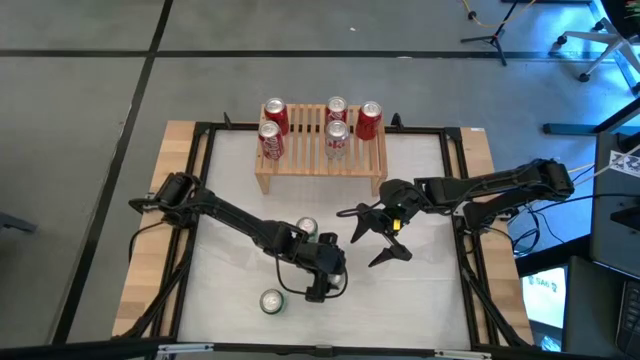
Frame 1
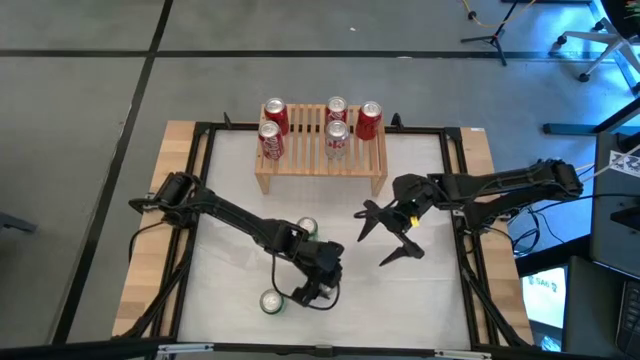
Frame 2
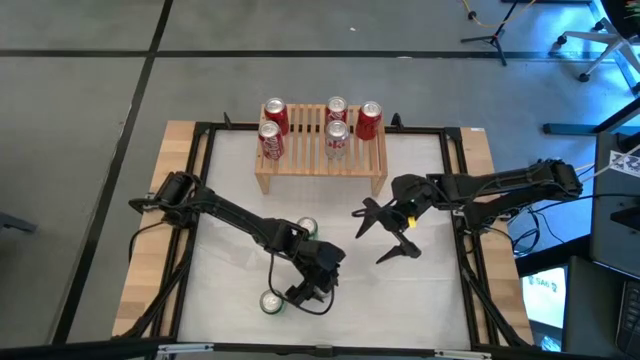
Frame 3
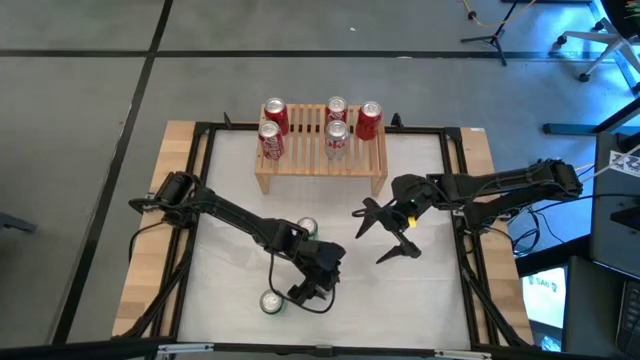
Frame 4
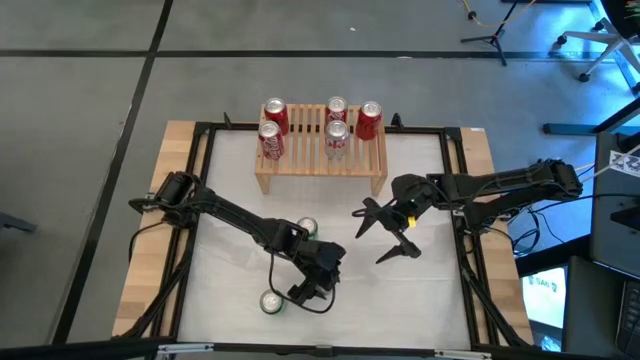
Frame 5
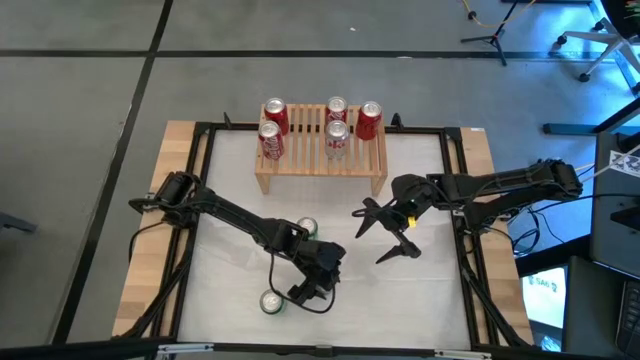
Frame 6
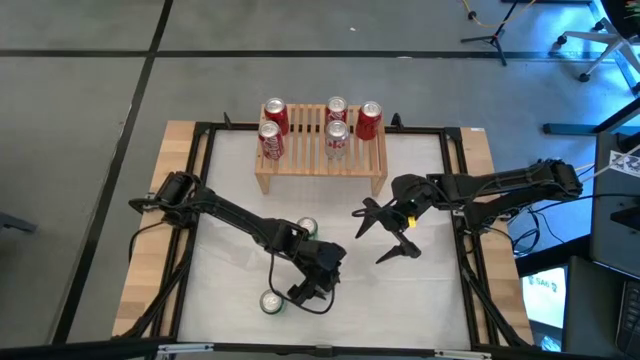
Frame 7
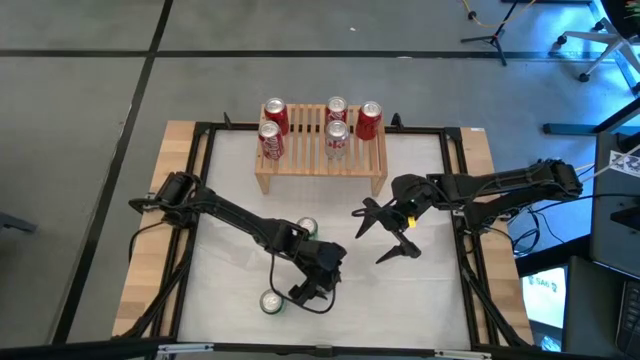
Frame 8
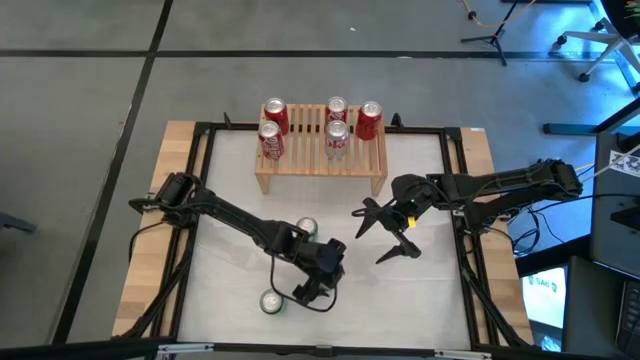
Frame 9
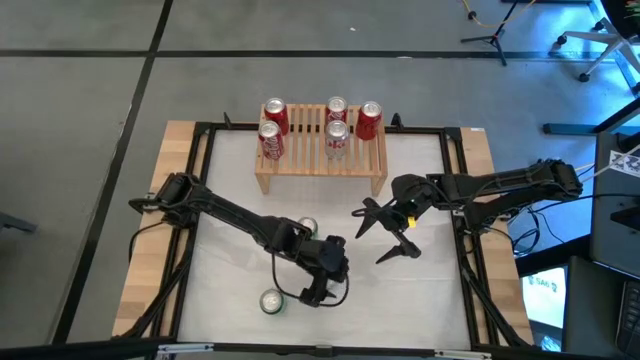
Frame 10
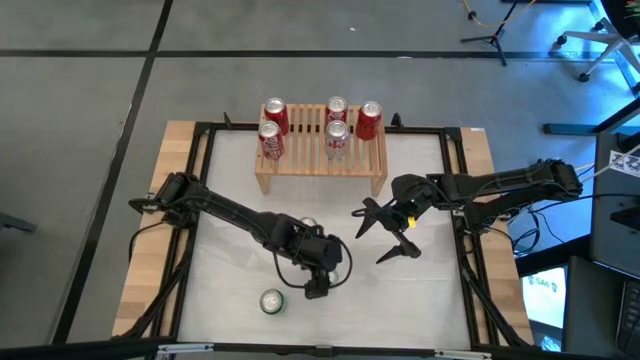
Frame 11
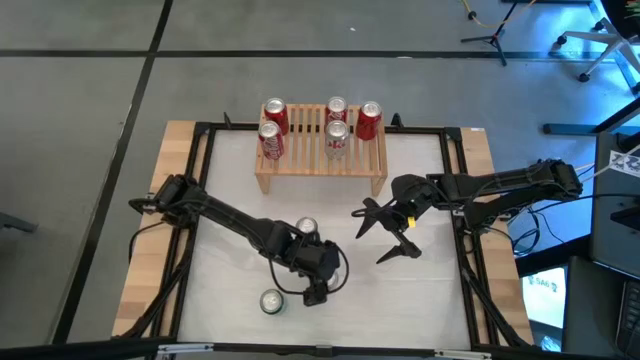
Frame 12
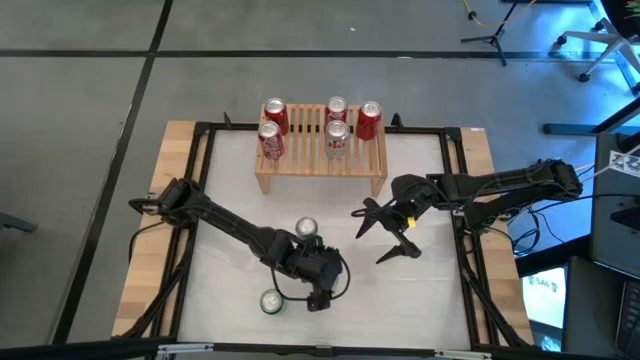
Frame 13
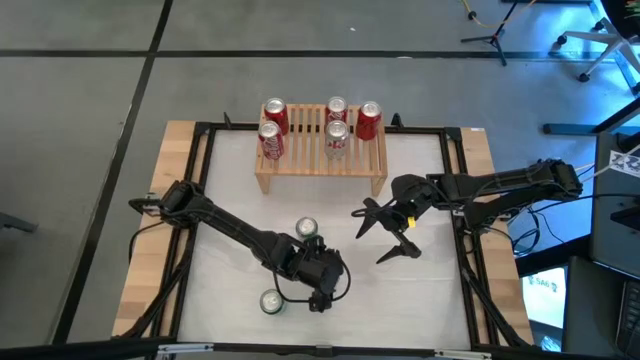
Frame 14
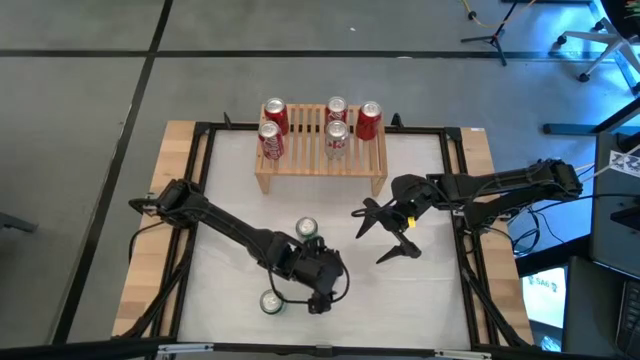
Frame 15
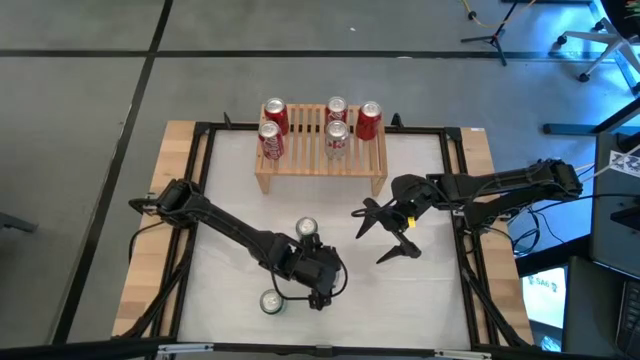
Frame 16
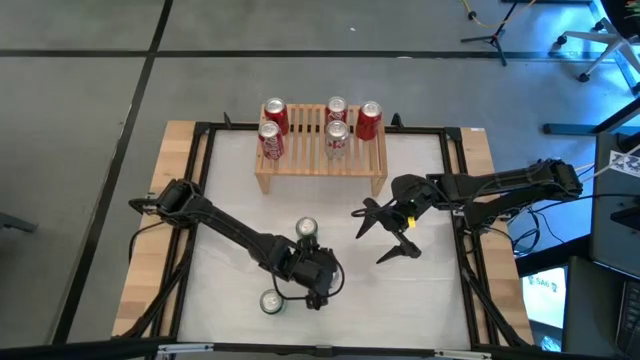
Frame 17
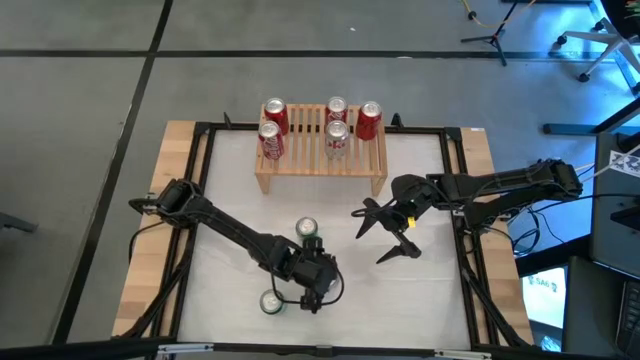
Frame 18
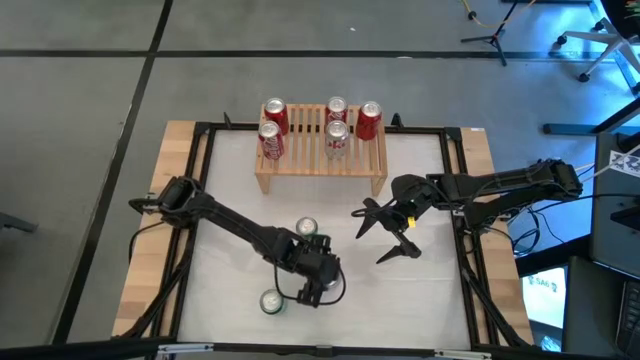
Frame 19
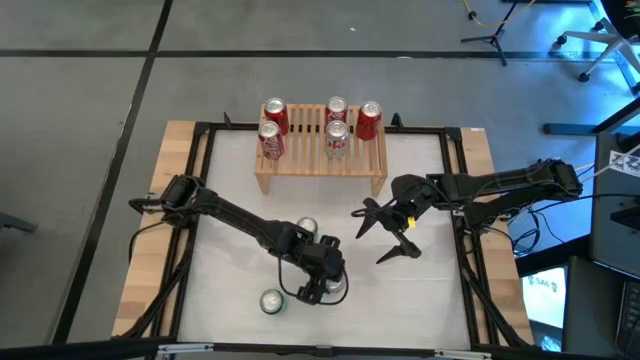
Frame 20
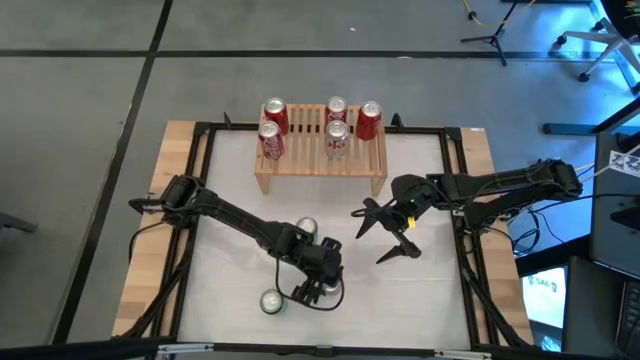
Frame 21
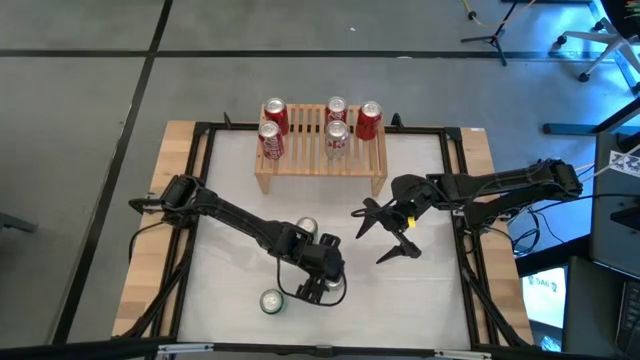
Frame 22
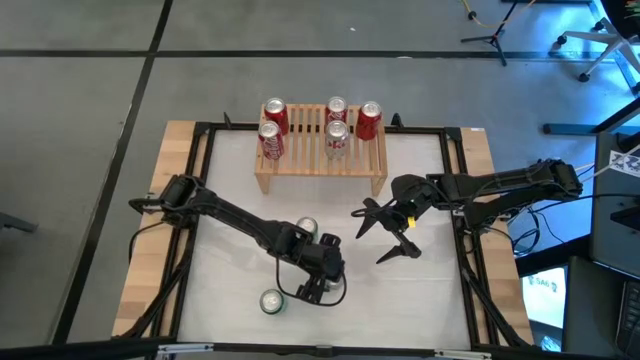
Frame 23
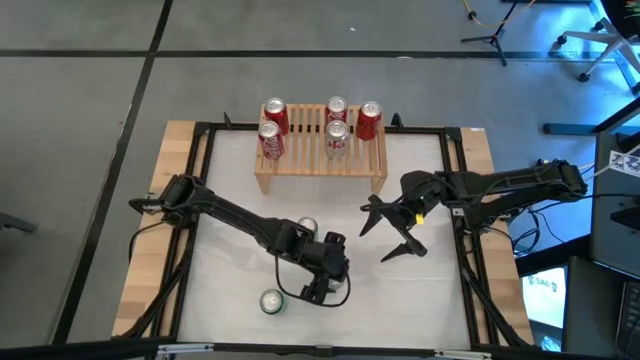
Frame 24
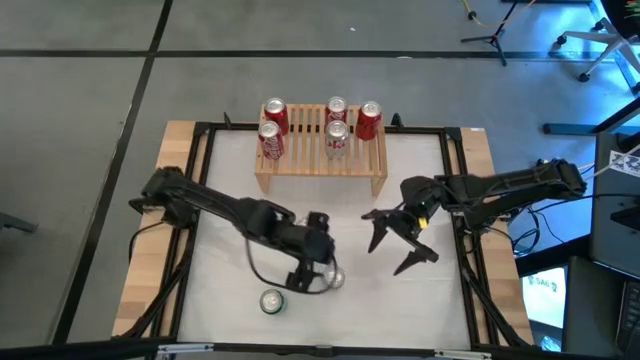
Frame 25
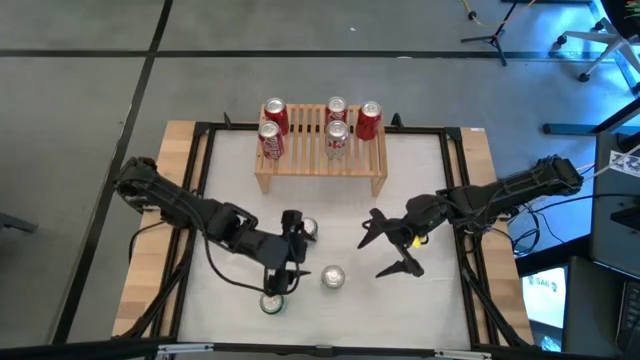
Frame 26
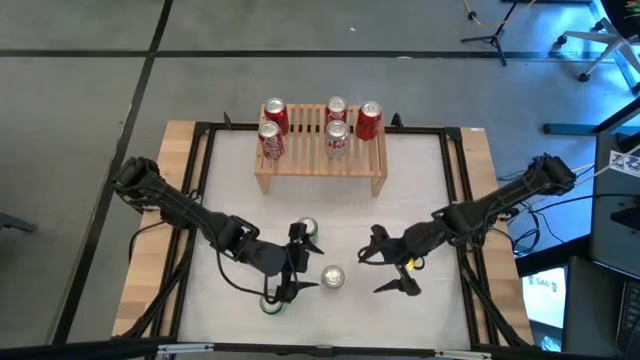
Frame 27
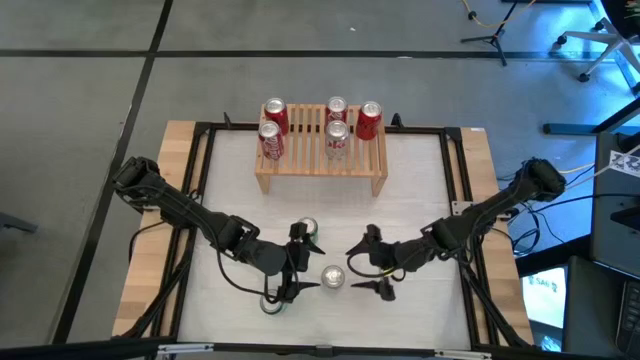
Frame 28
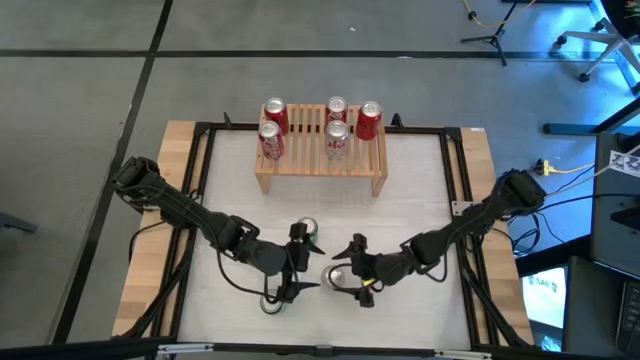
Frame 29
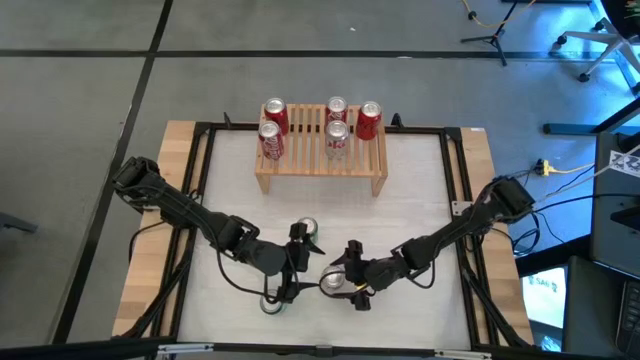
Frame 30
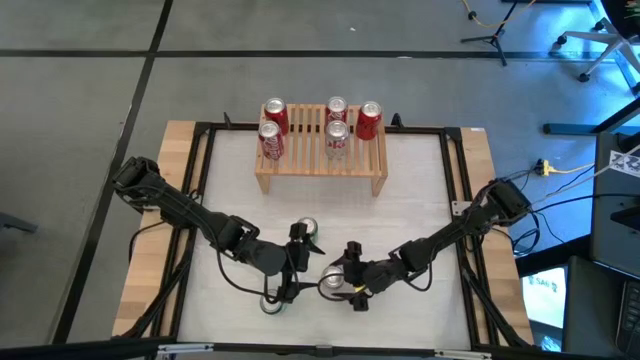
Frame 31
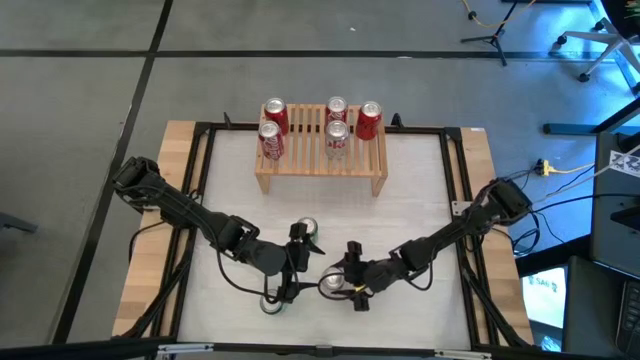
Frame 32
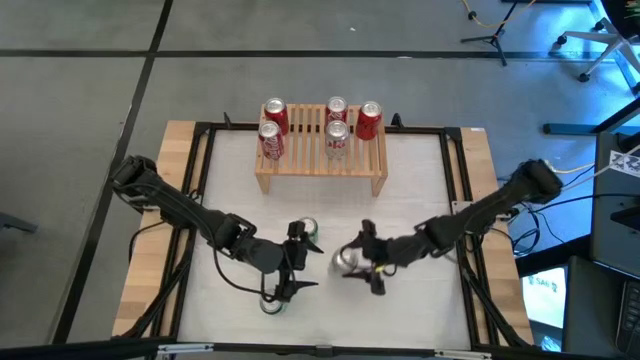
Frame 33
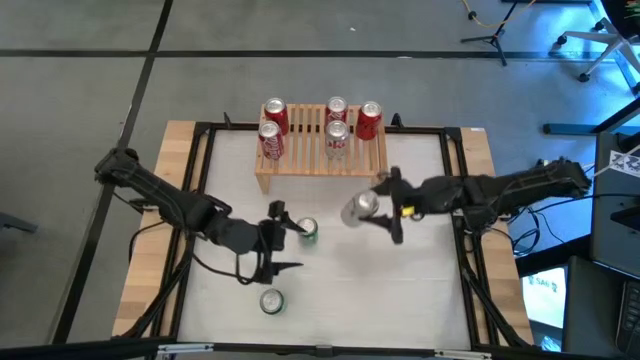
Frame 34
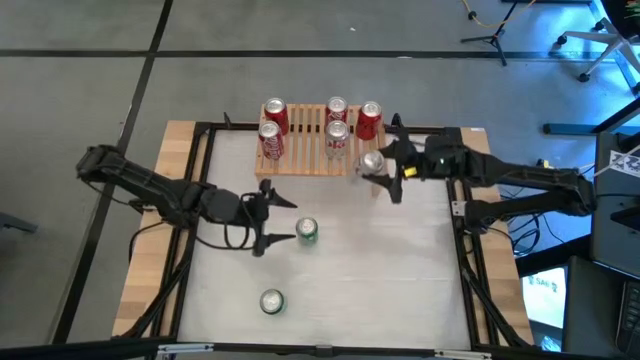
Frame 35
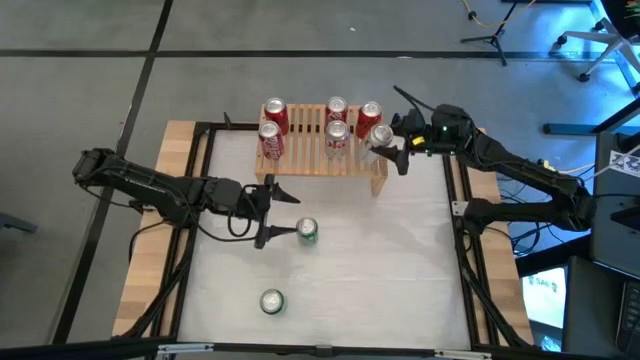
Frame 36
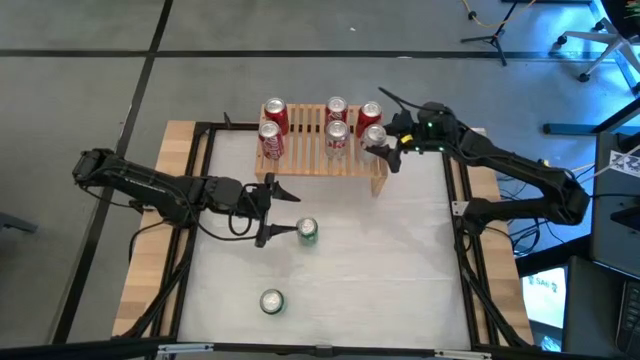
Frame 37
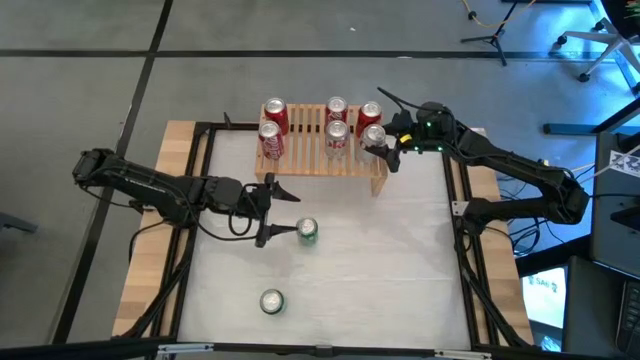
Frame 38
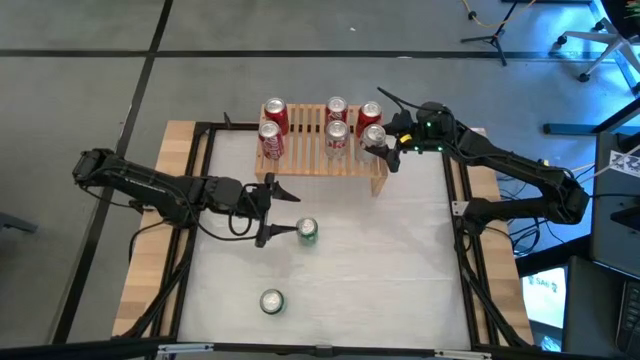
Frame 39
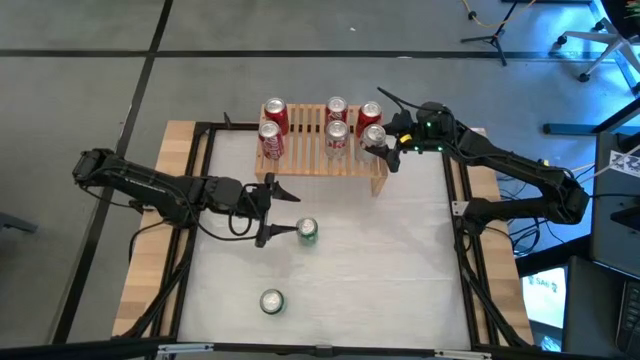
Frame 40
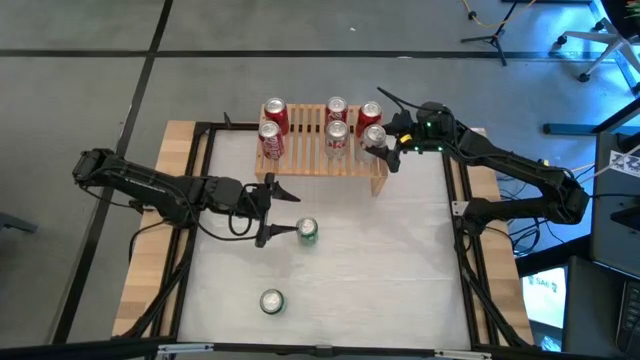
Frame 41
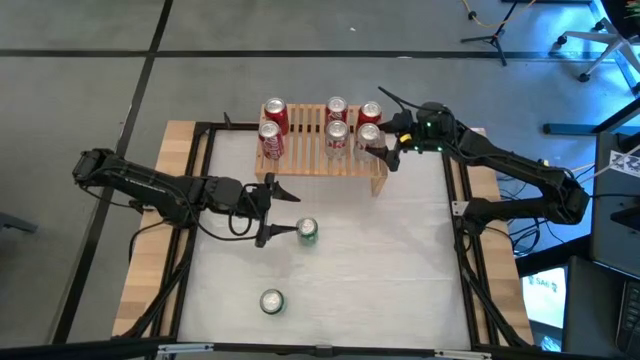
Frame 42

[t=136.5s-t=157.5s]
Task: Place canned beverage on shelf
Put the red silver soda can on the shelf
